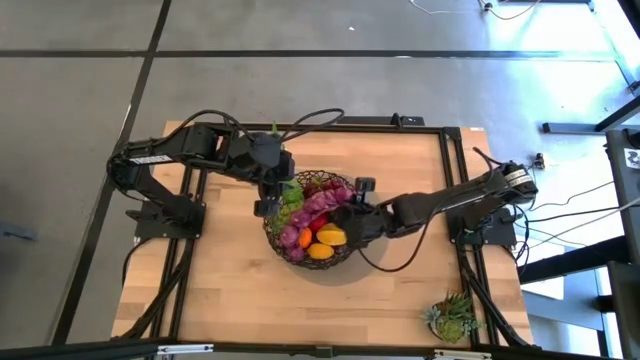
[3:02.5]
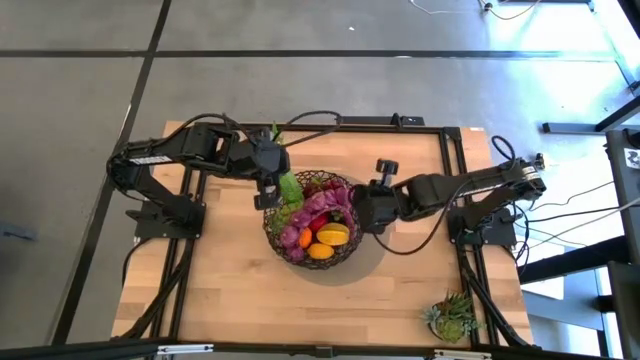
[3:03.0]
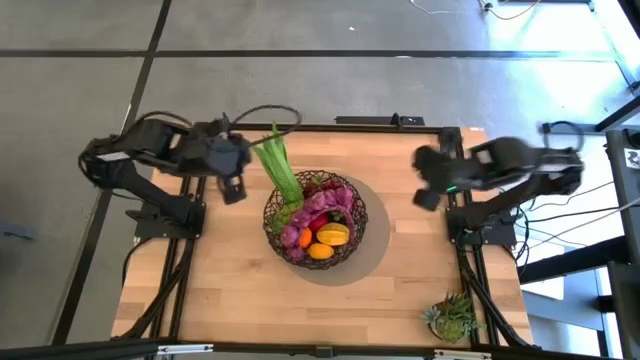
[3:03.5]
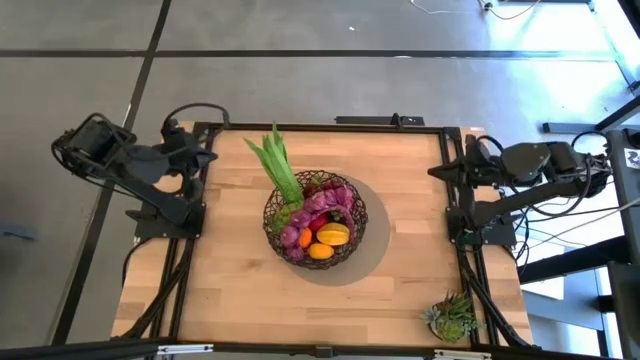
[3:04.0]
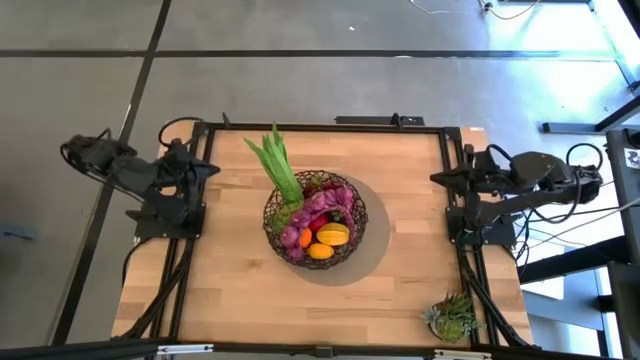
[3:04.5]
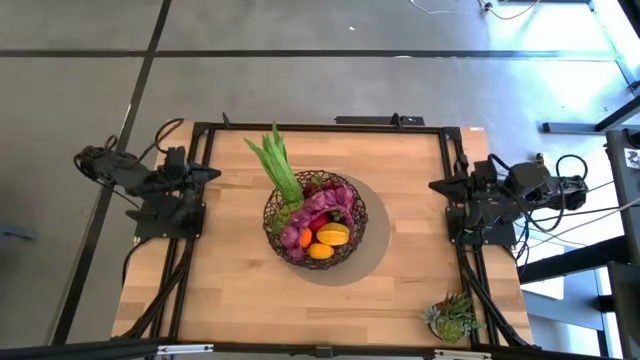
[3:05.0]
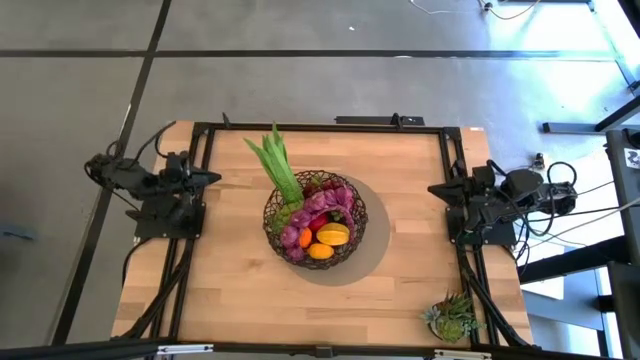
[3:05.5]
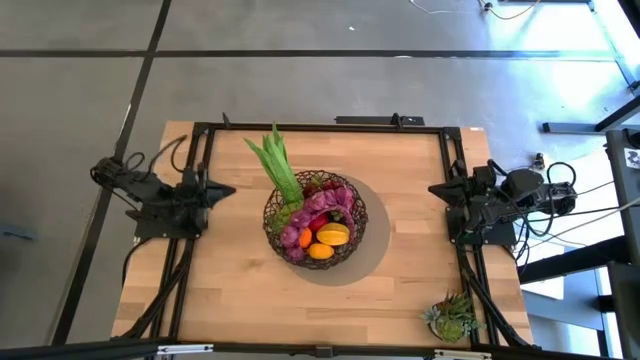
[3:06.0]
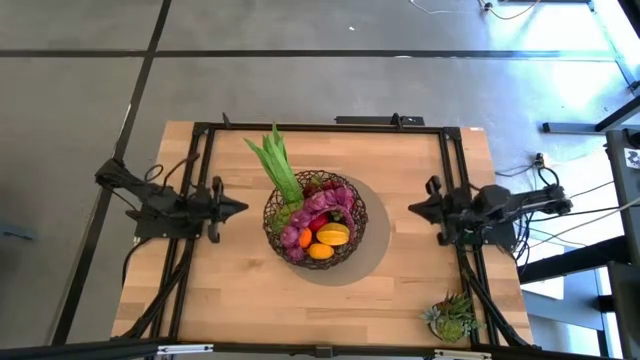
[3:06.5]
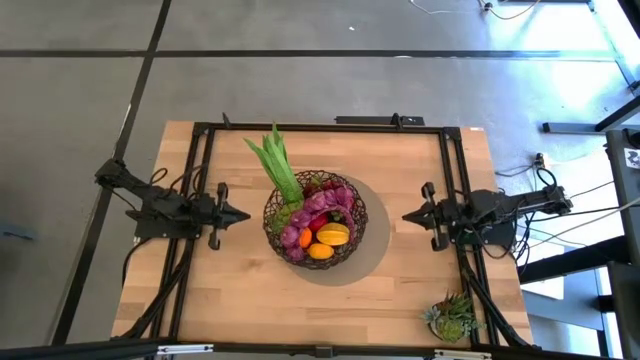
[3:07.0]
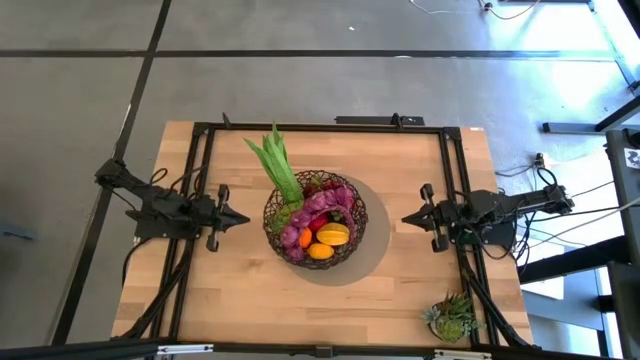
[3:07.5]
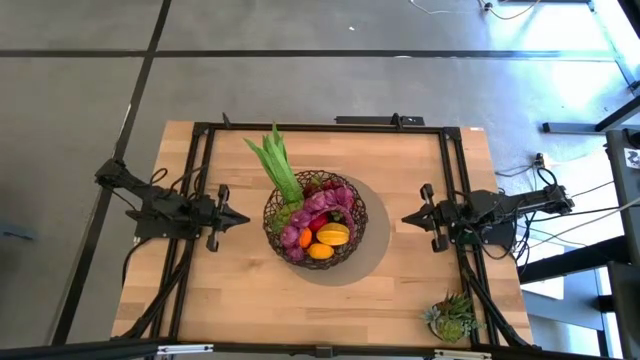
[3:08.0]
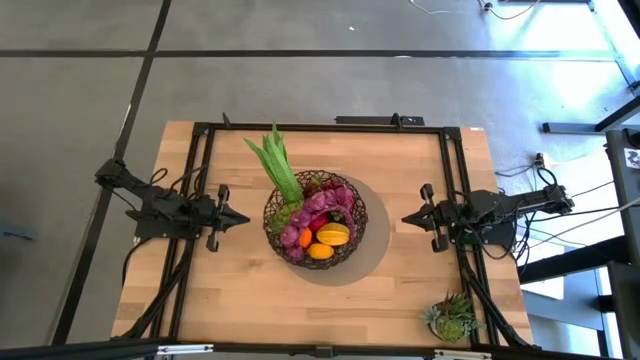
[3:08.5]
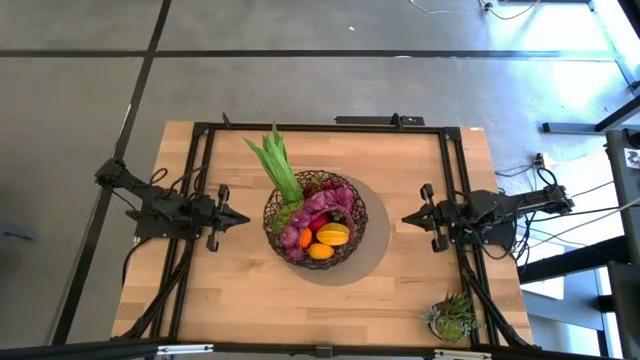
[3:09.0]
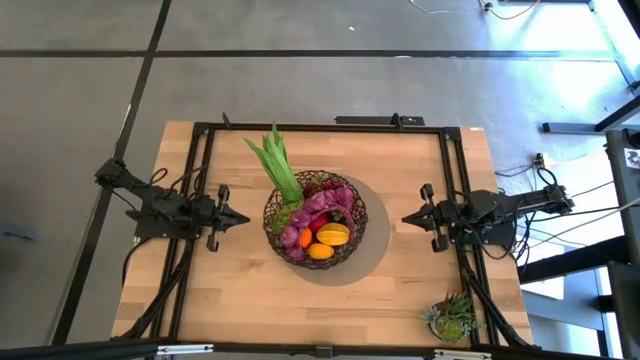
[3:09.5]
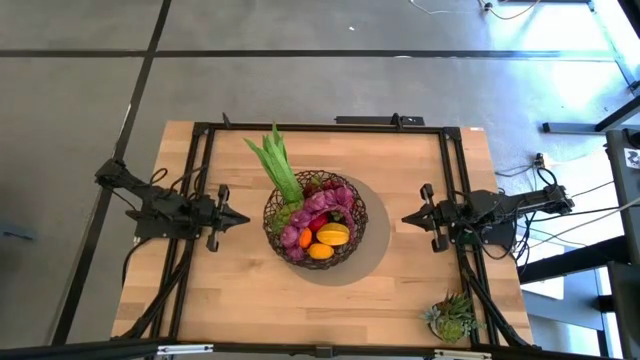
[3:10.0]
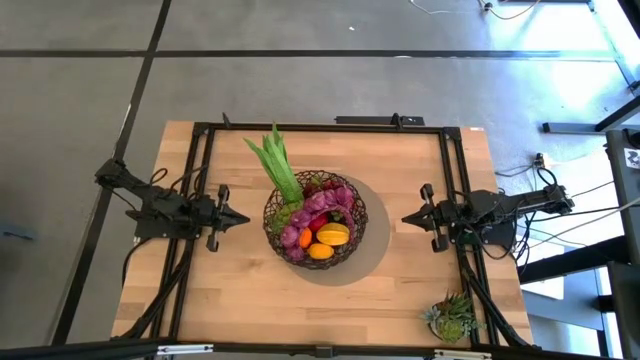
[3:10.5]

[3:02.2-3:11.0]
Task: Build produce basket
Return to Home Position

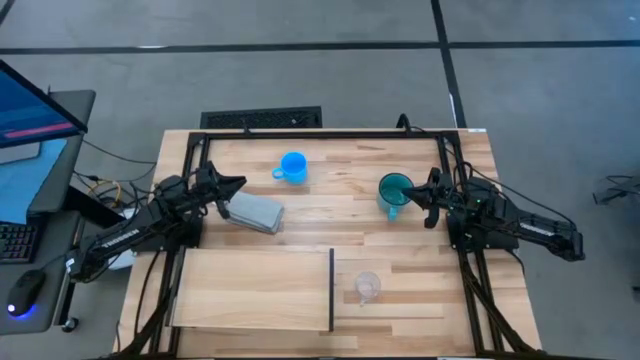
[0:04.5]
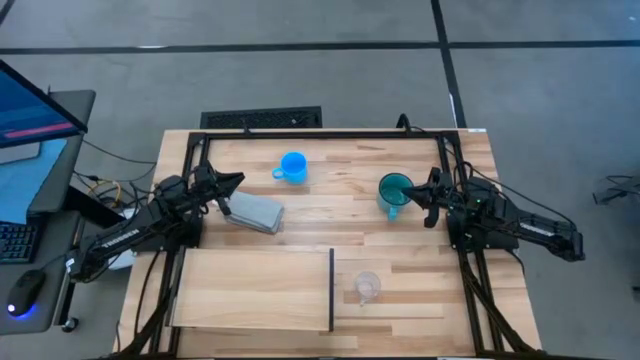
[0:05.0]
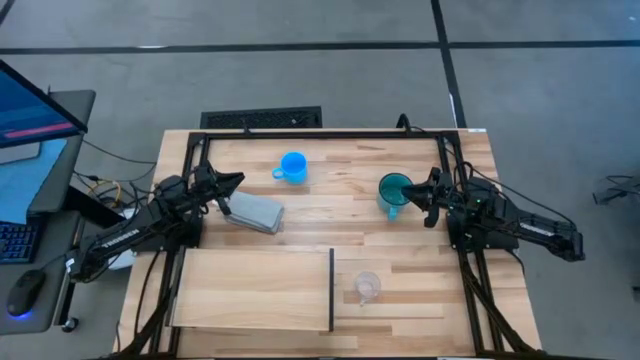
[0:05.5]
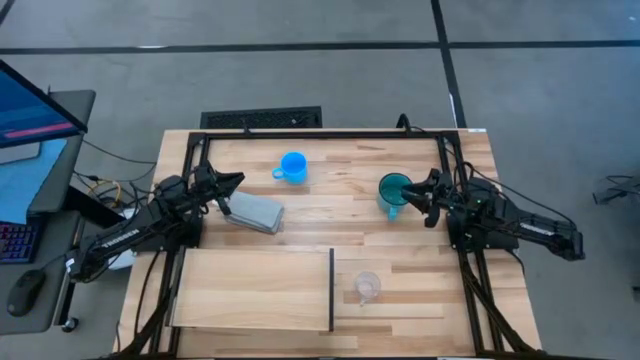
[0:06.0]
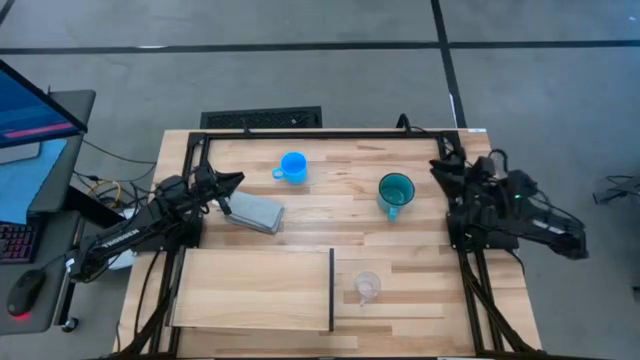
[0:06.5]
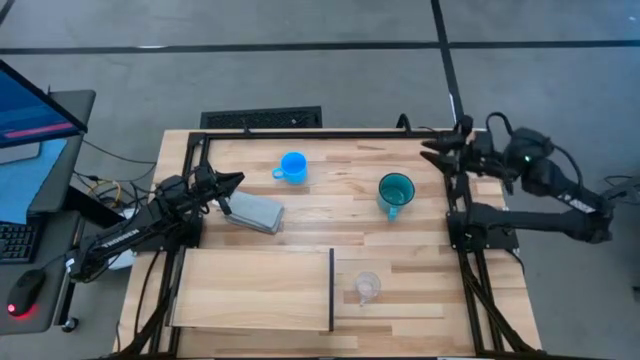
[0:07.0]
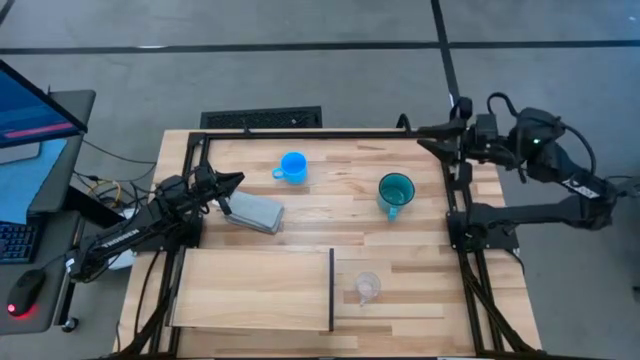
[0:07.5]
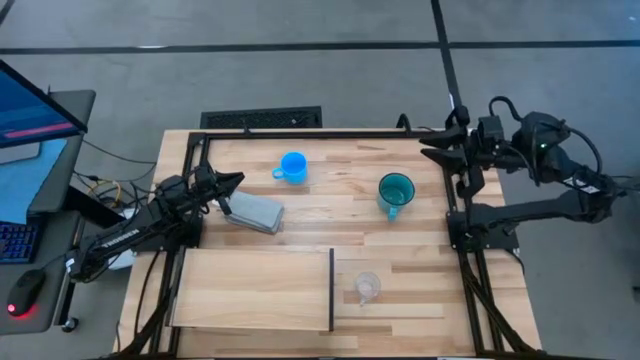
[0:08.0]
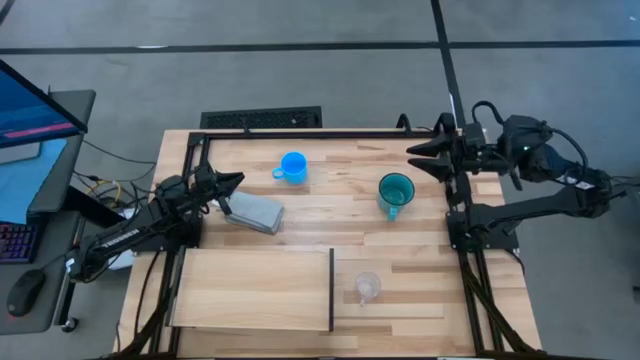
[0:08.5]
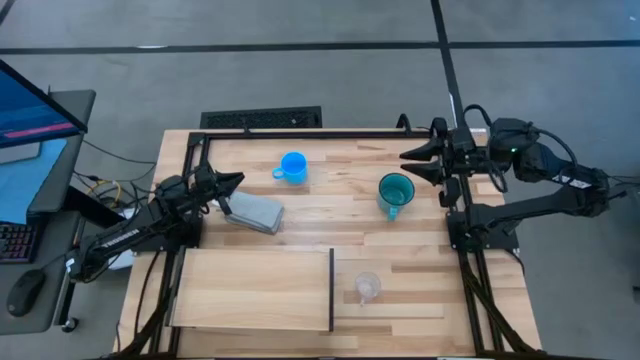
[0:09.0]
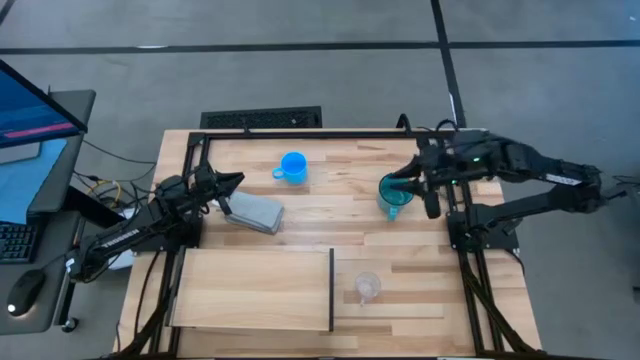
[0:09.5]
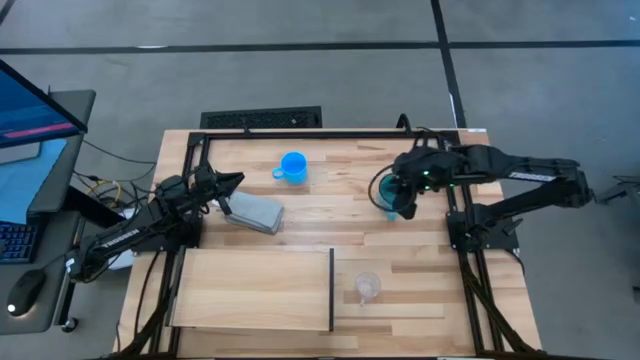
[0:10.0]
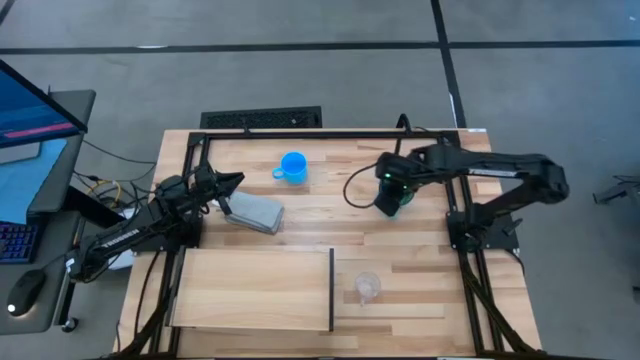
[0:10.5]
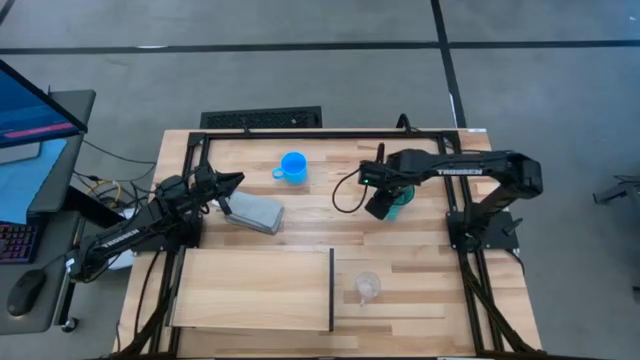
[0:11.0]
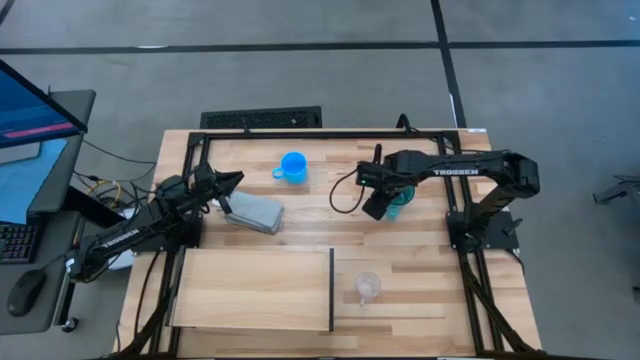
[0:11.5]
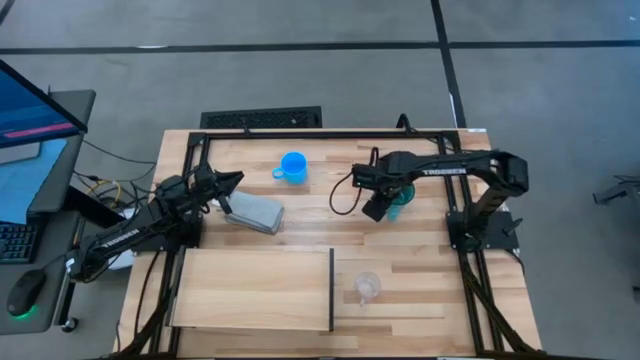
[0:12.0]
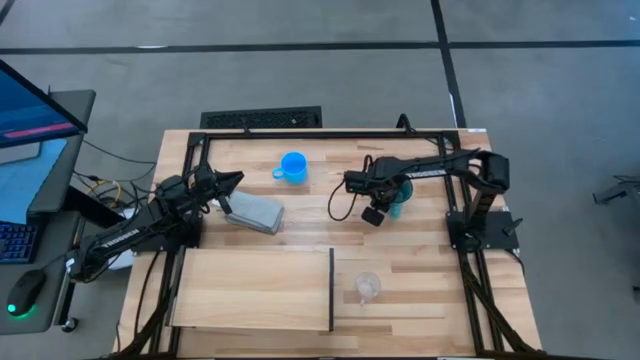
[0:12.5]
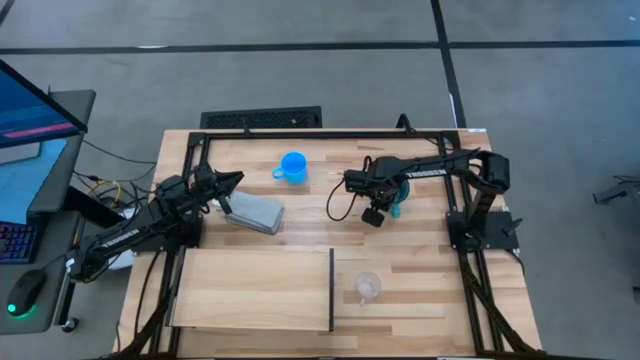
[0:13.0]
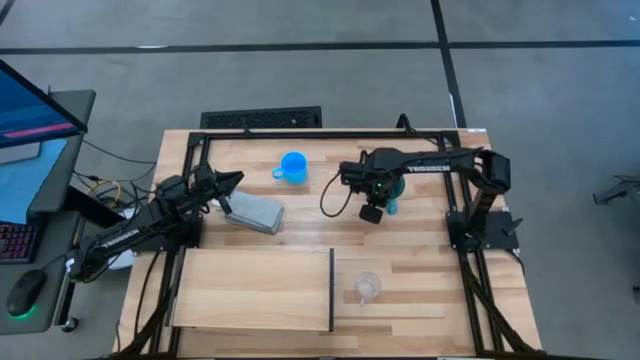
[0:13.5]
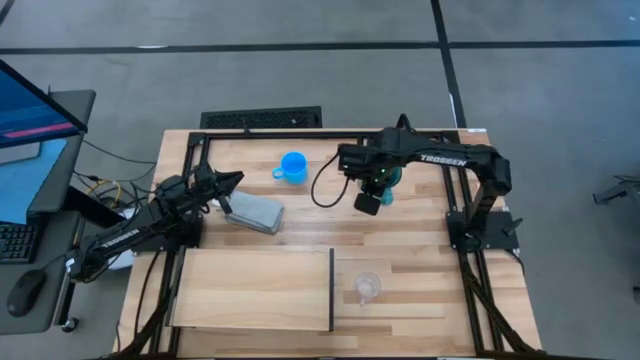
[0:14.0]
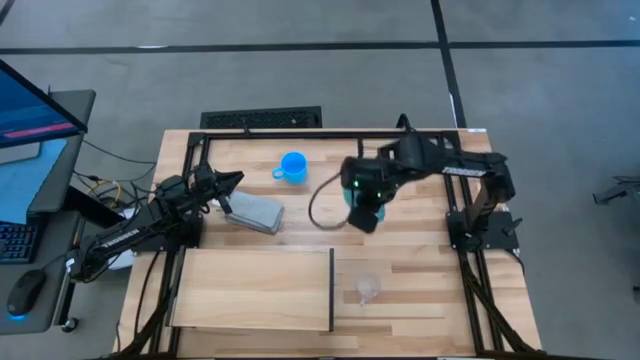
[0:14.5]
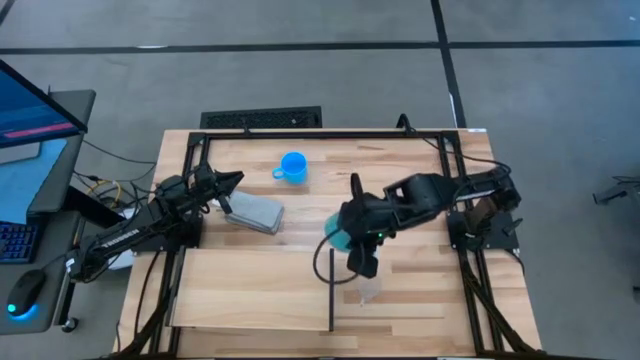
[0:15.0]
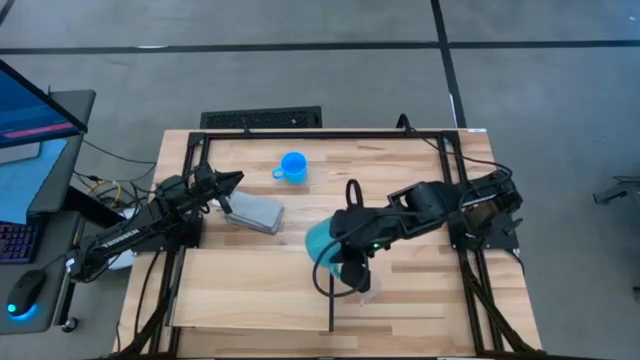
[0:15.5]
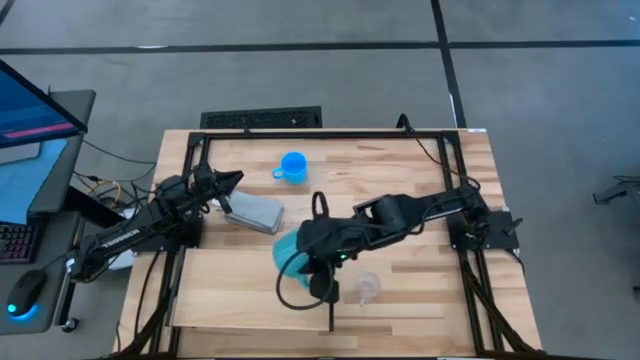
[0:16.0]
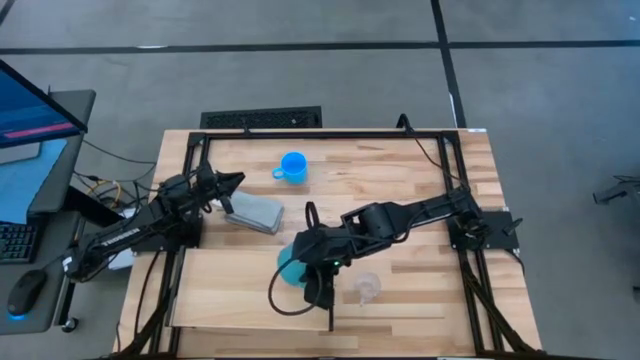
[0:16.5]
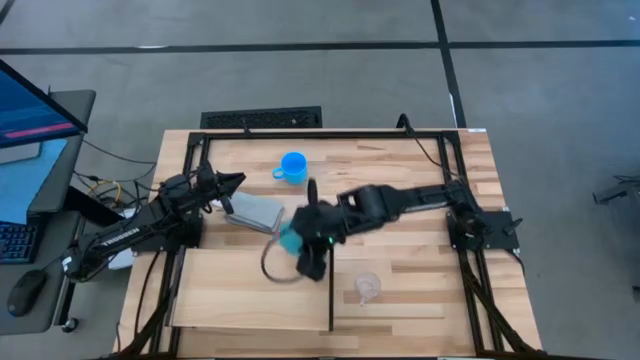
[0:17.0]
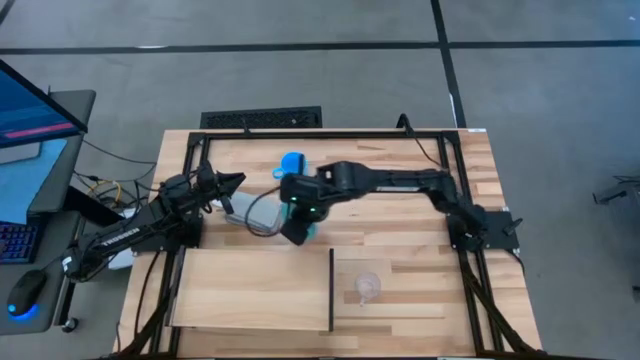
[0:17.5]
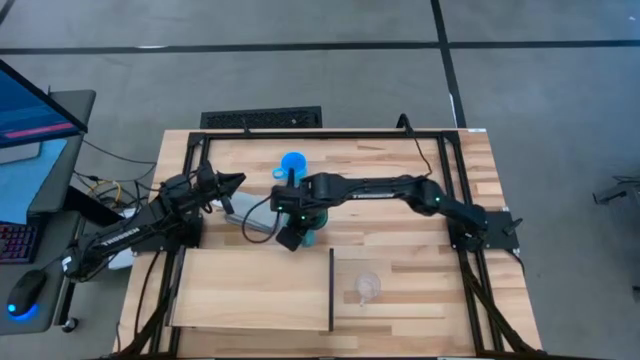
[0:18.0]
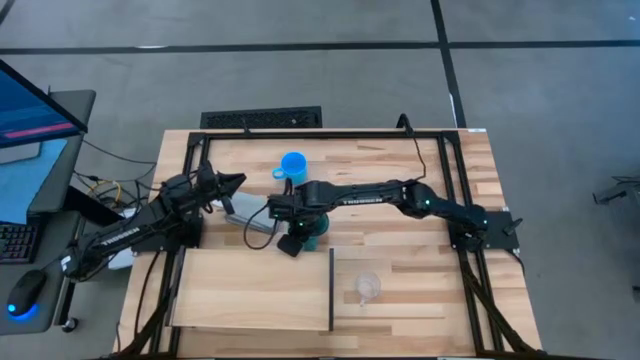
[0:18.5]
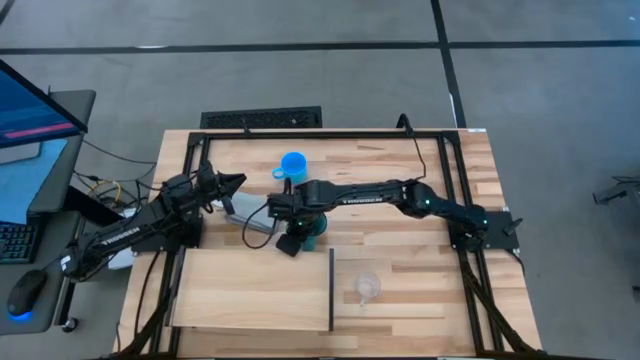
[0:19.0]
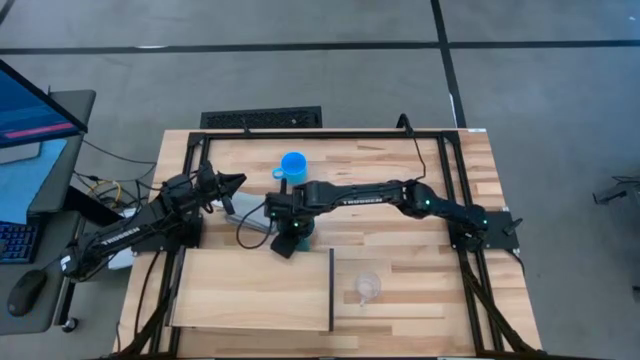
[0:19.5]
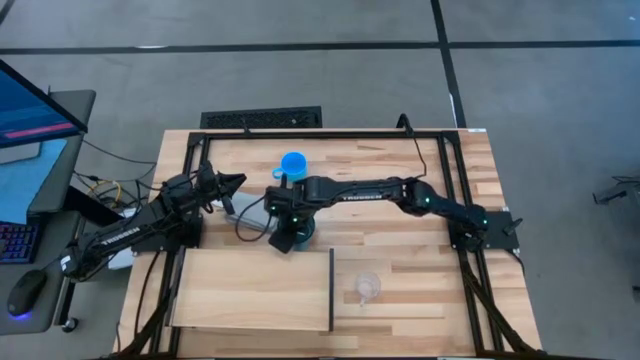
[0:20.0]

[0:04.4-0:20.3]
Task: Stack small to large cups/mugs on shelf
Put the green mug on the shelf
